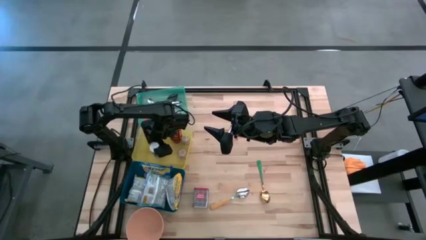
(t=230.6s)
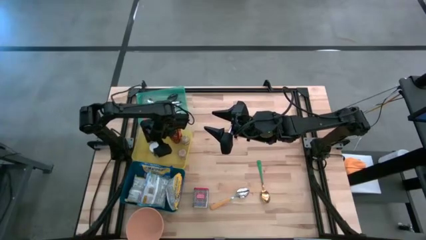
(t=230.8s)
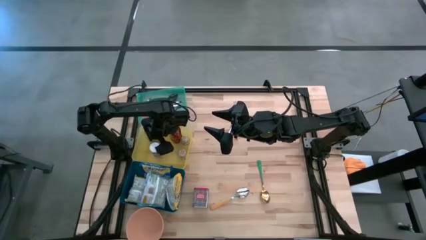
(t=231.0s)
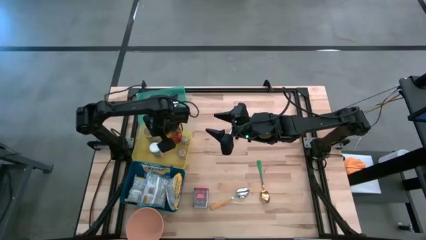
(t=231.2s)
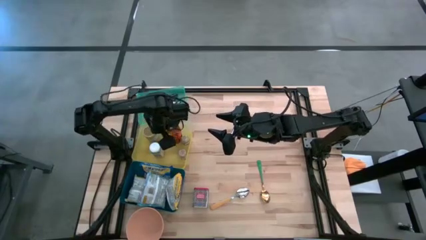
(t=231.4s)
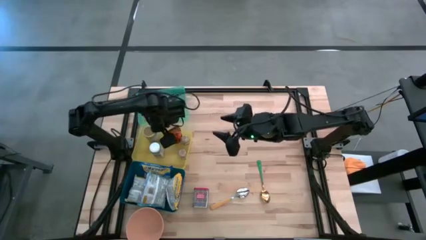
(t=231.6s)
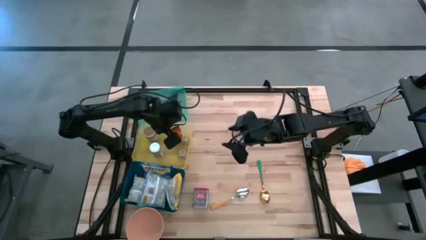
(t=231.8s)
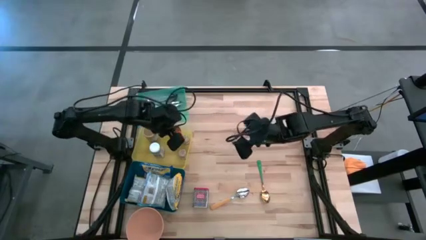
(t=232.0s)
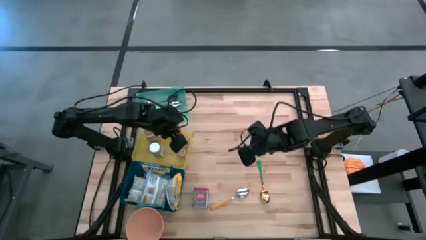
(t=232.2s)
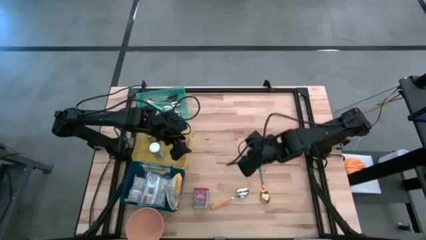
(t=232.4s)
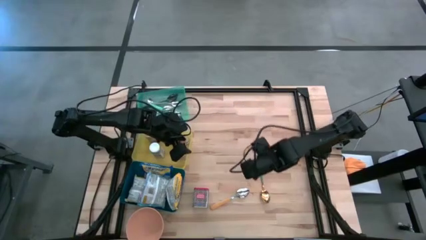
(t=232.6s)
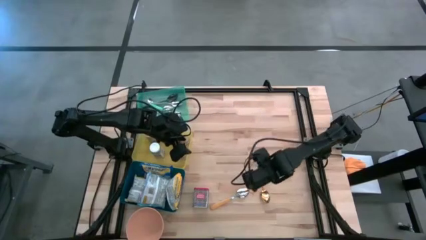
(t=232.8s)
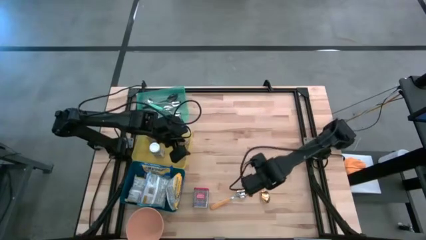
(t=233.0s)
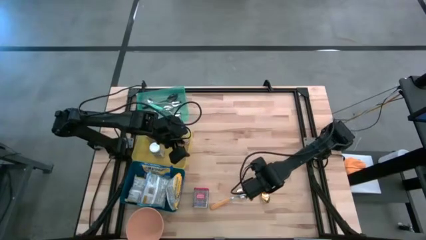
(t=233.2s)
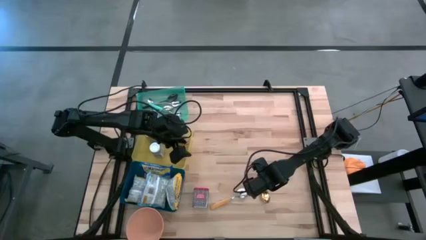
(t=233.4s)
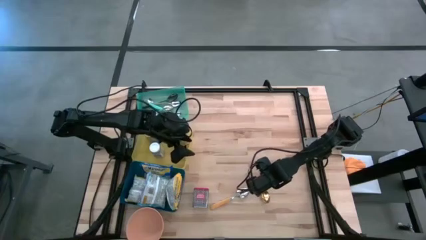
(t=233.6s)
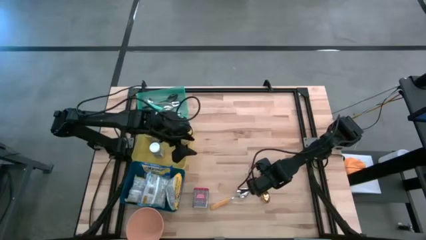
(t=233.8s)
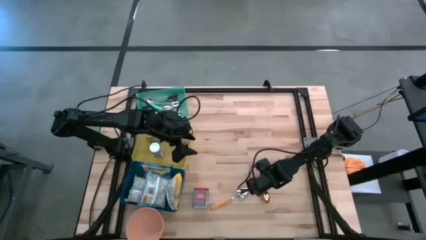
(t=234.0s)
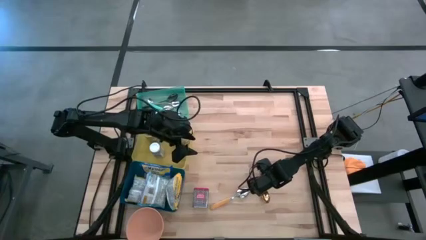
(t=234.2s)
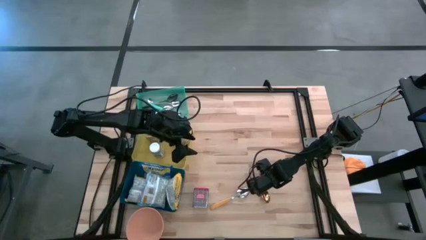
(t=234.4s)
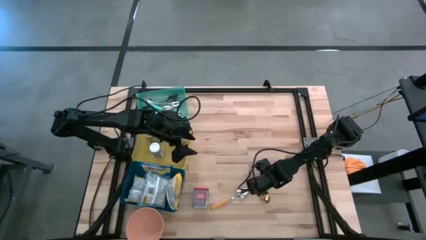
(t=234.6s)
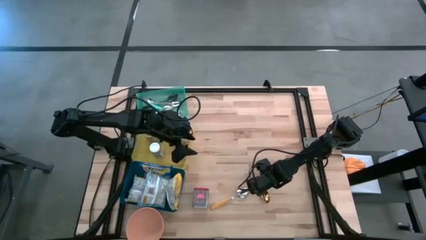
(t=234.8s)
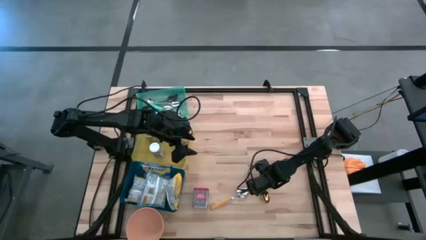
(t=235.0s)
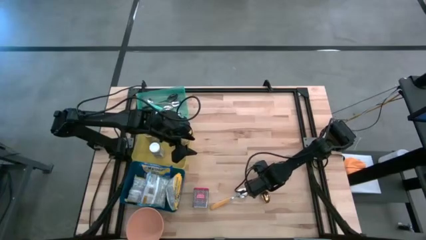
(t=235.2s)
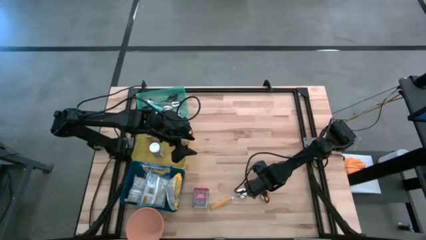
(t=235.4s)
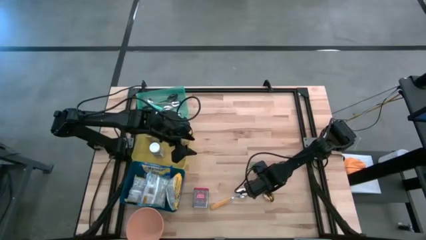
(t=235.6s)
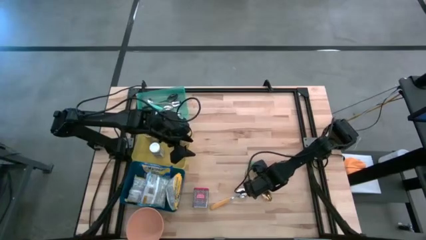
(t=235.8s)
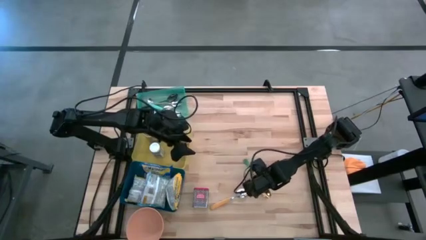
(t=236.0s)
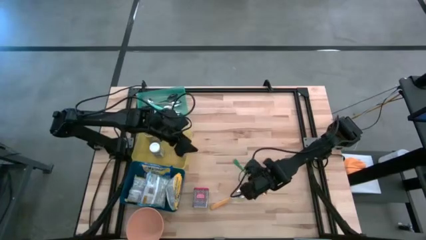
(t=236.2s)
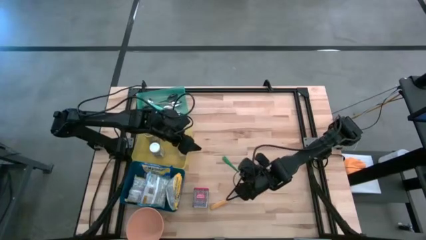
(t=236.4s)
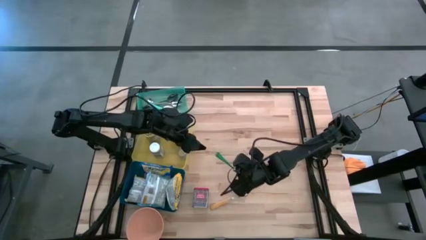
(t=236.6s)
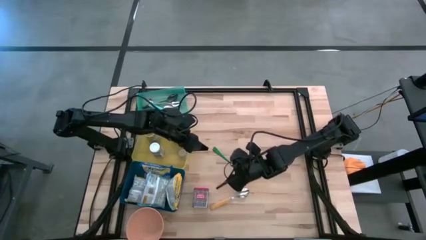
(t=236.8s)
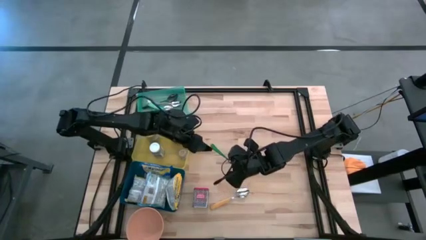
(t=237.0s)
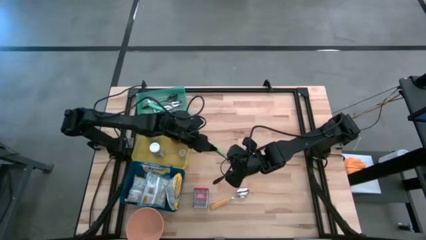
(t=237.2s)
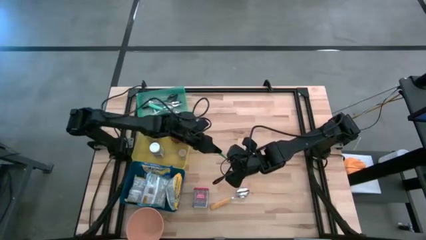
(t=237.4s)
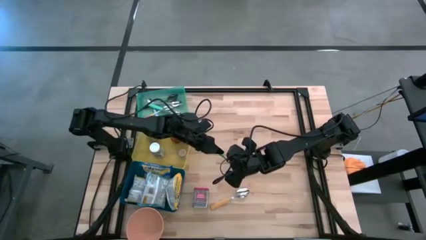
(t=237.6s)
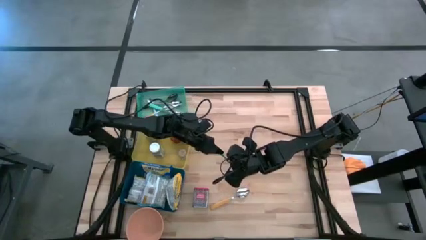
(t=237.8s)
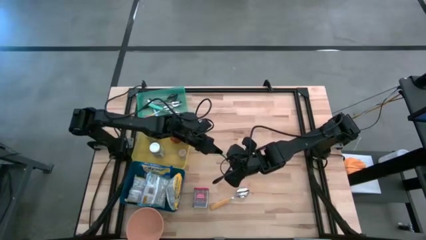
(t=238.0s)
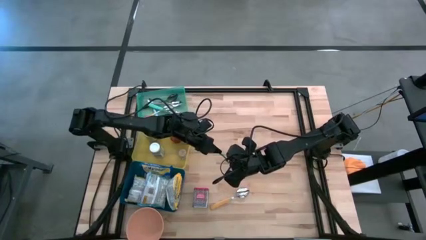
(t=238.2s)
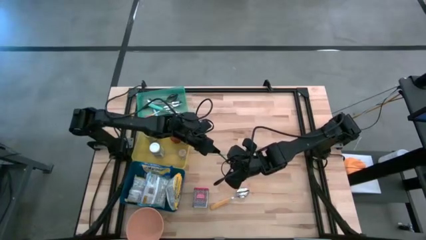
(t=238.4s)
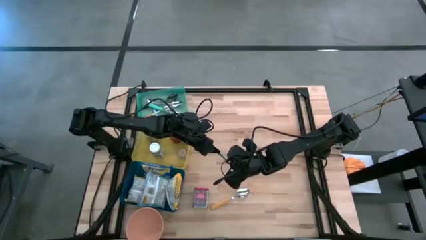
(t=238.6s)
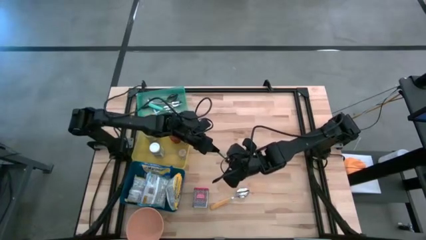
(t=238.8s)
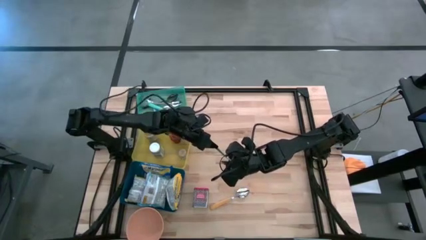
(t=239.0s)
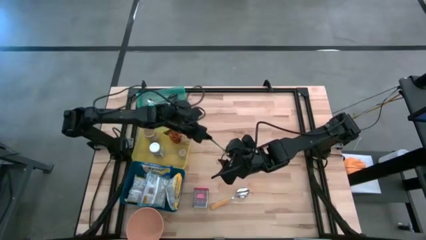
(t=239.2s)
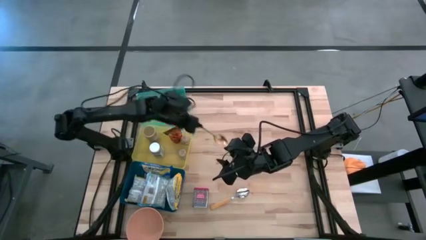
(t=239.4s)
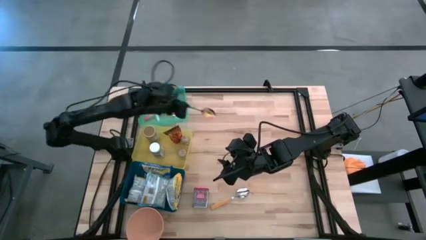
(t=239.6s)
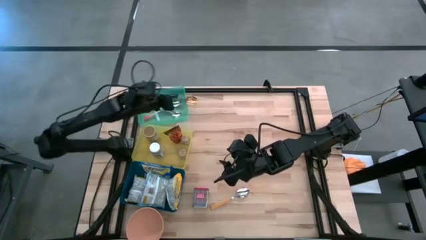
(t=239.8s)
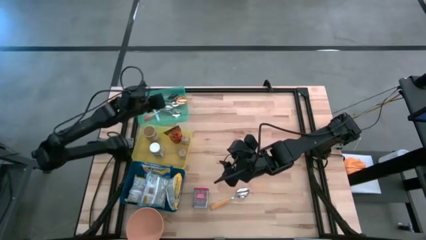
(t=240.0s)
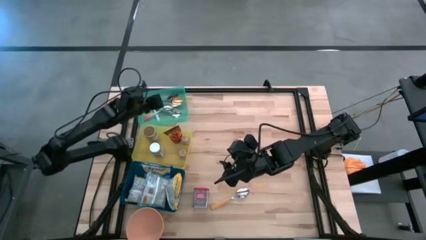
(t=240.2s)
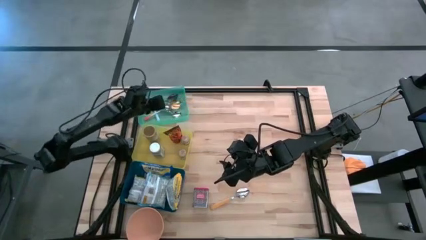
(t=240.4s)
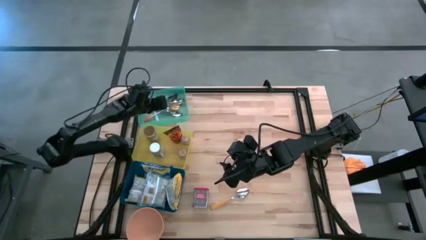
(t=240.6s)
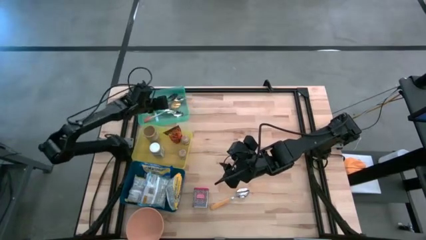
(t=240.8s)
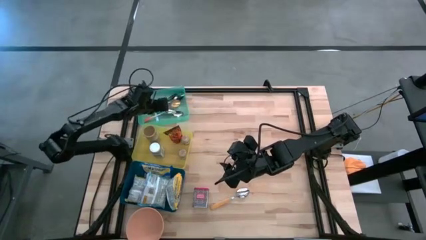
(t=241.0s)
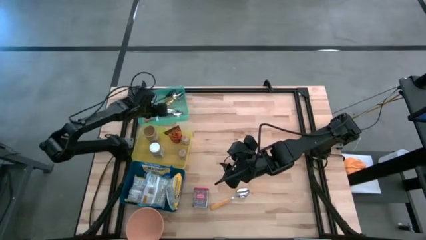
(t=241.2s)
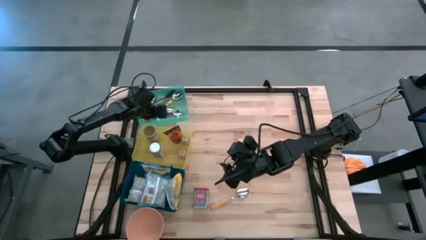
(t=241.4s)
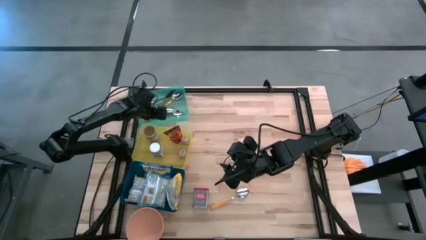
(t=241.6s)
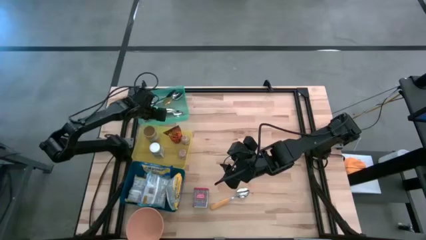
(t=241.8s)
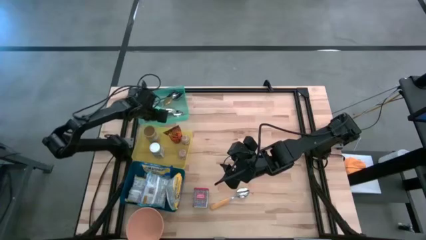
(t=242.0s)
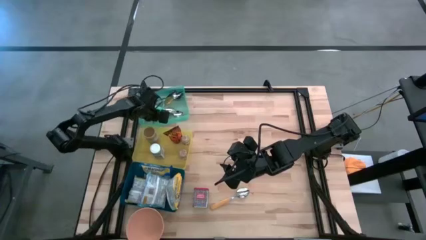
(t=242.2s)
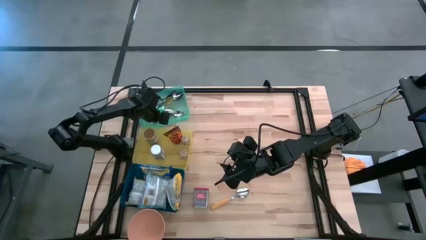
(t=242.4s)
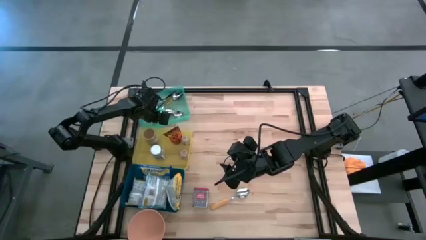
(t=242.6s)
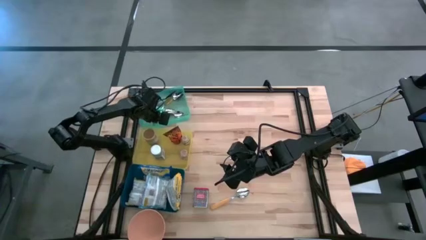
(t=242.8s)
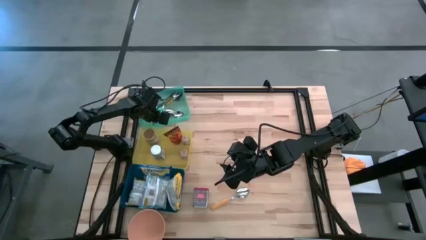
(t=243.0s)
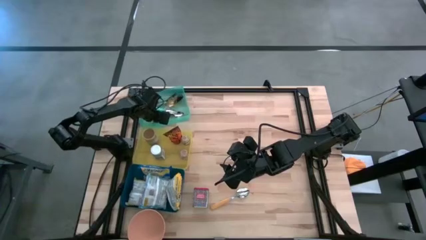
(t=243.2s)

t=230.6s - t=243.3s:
Put the green spoon into the green bin
